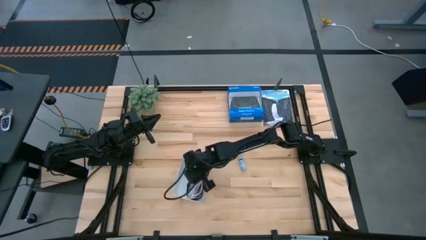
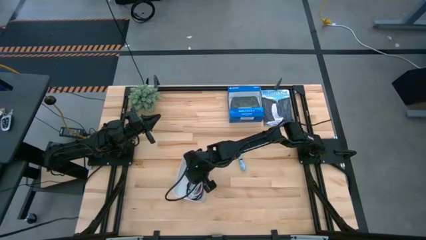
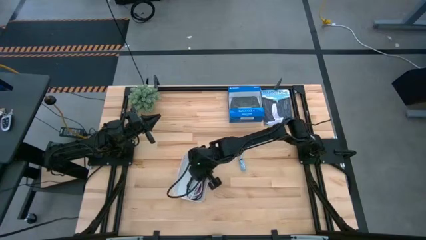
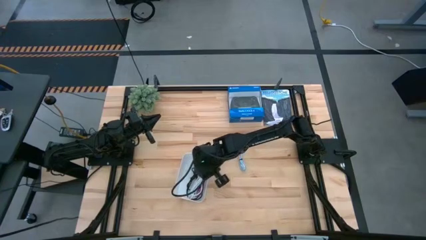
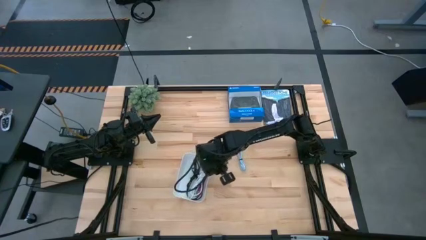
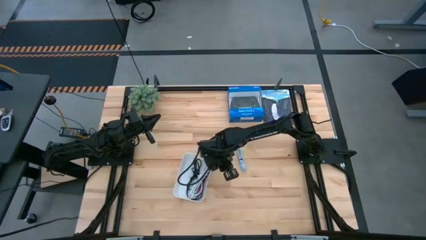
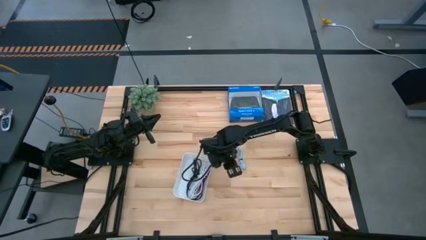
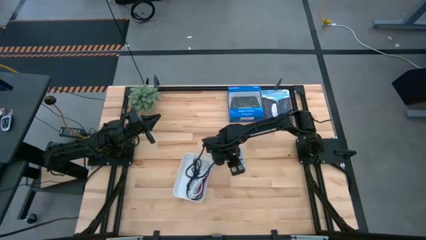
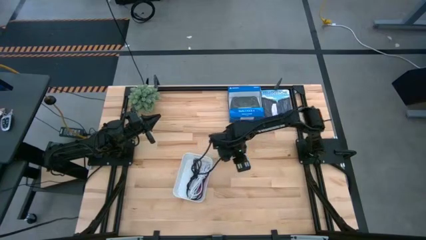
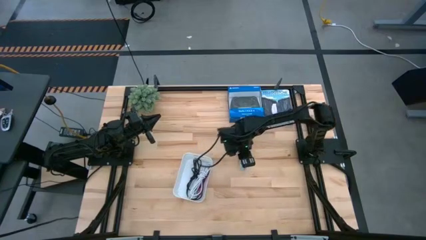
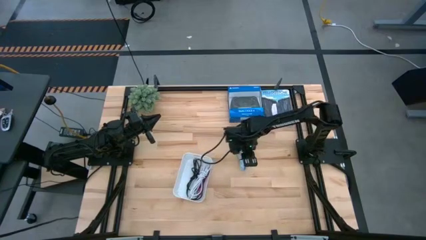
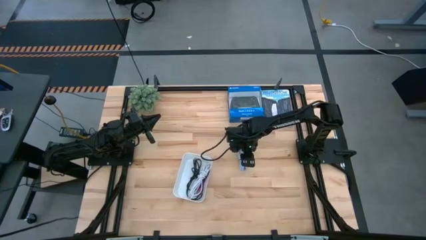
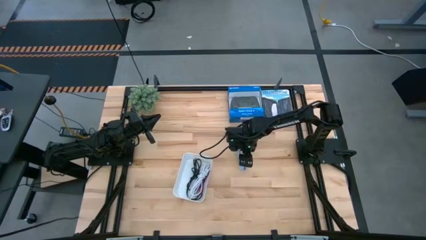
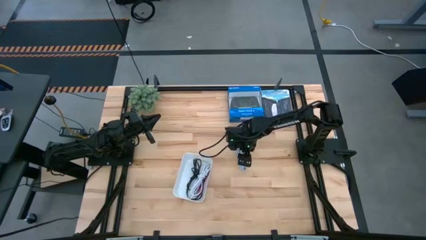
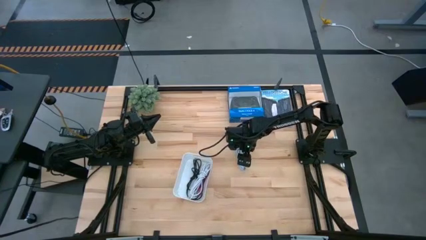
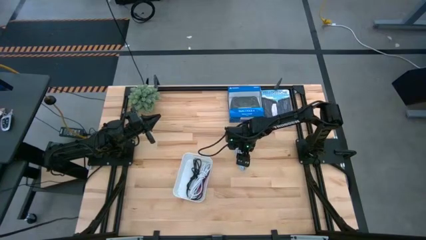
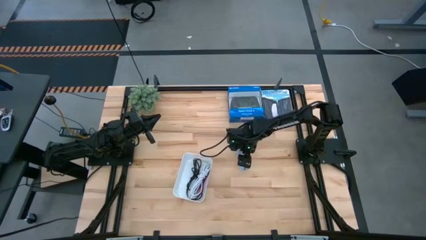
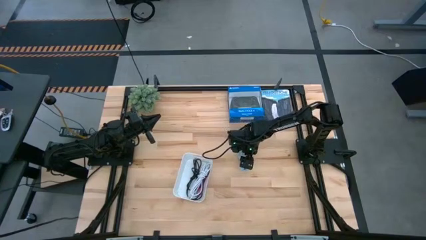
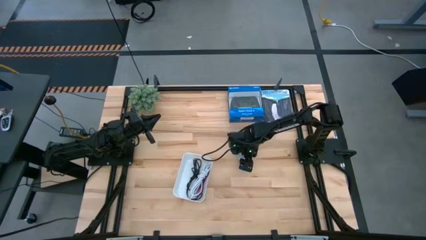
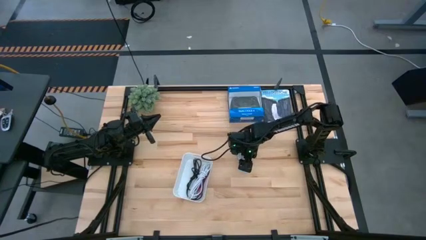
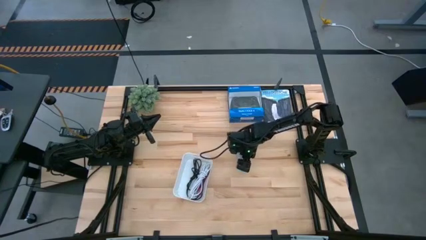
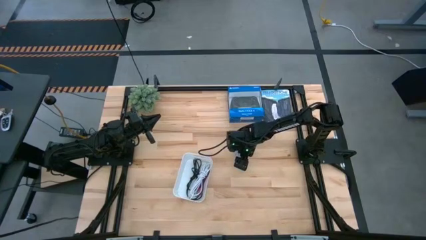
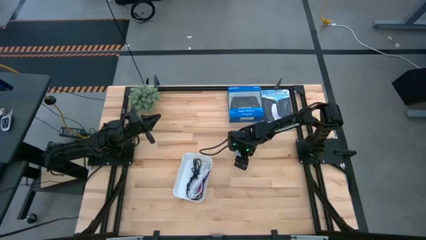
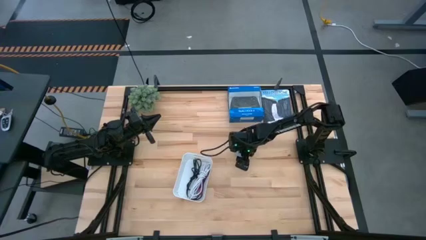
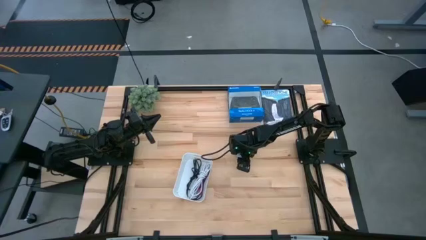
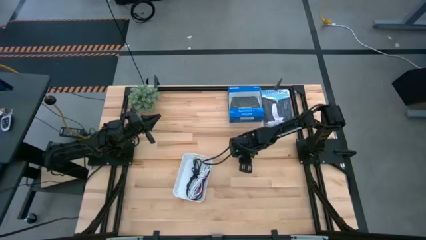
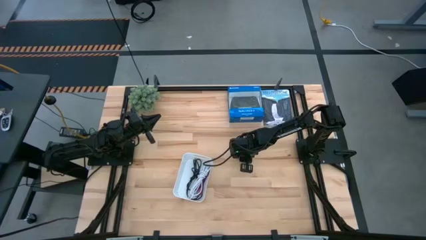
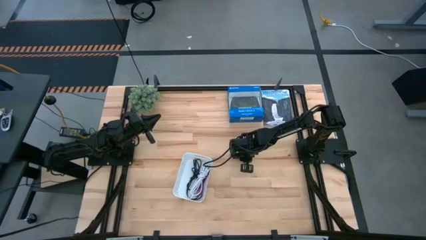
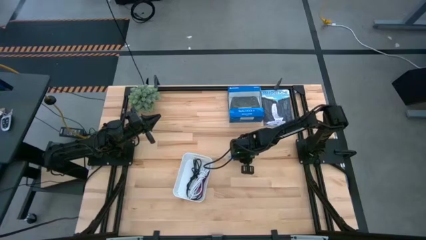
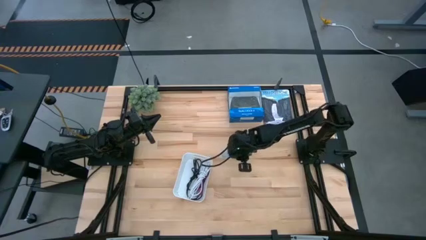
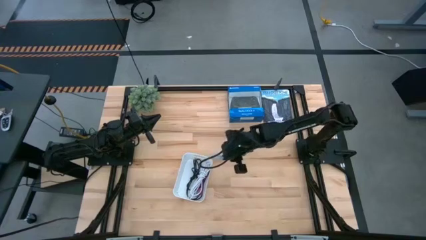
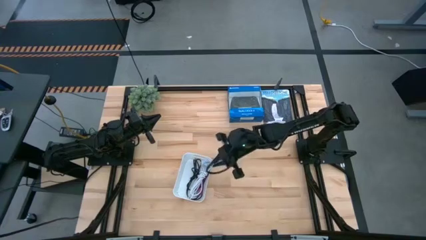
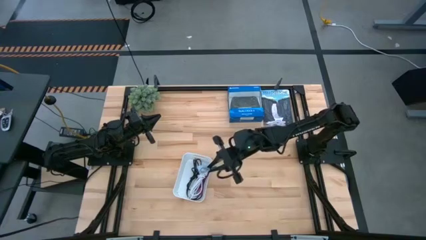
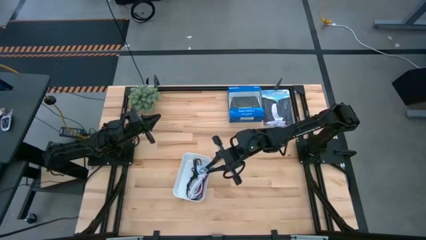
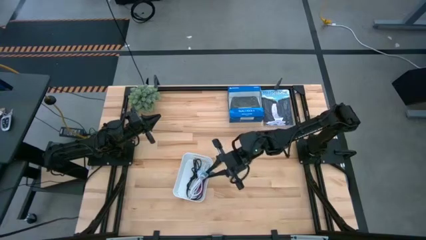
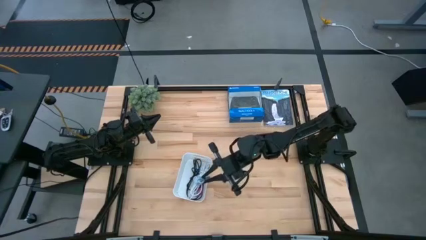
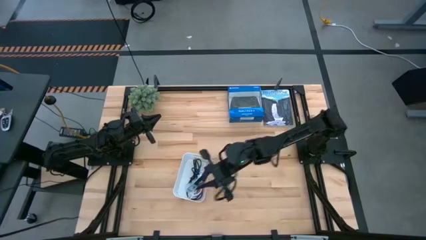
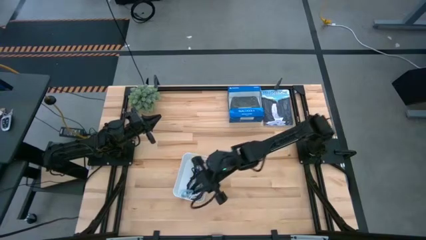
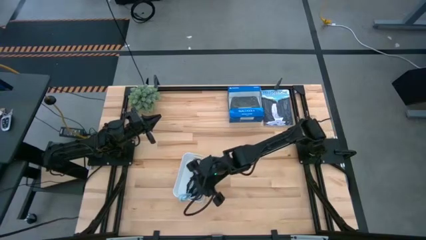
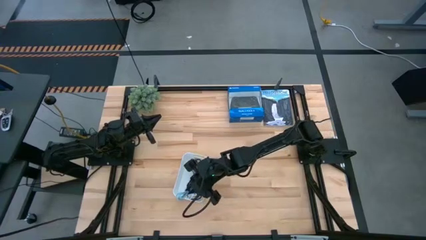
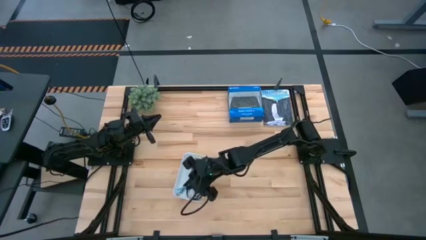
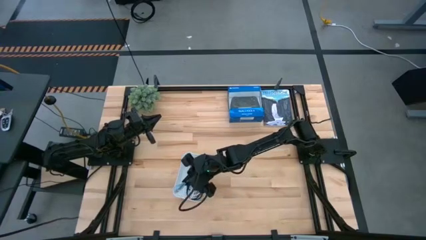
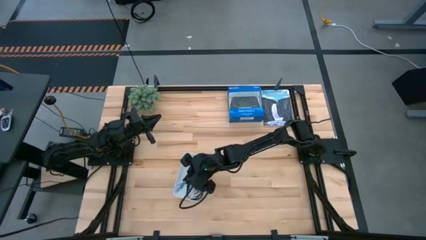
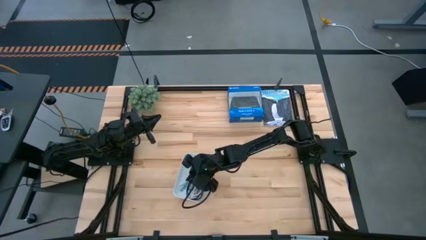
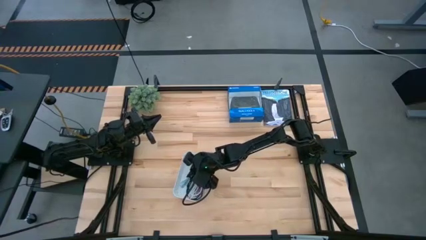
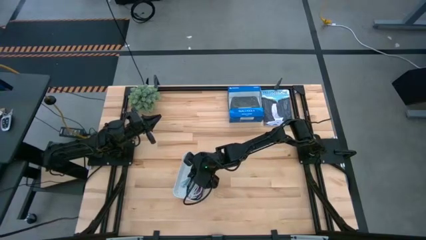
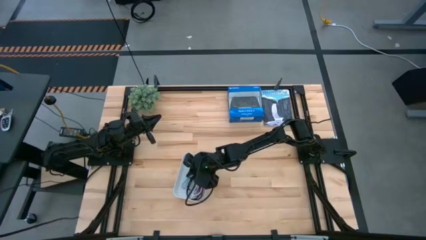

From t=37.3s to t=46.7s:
Task: Pick and place USB-C Cables
Put the blue charger cable into the white bin

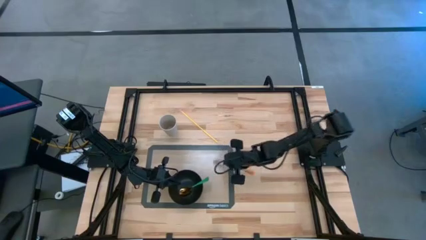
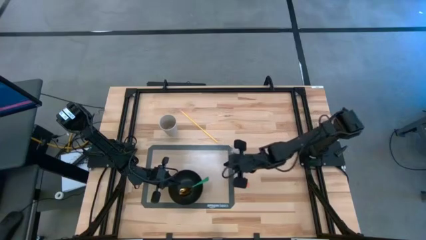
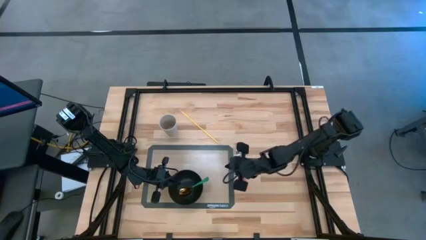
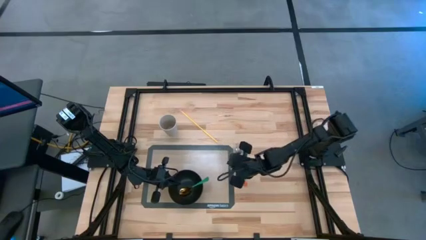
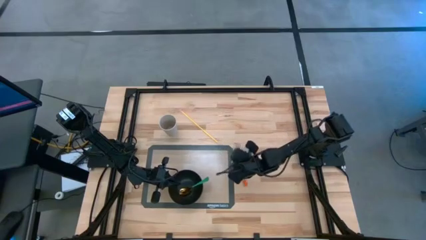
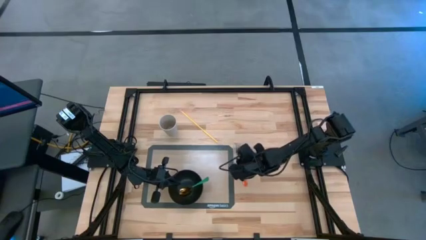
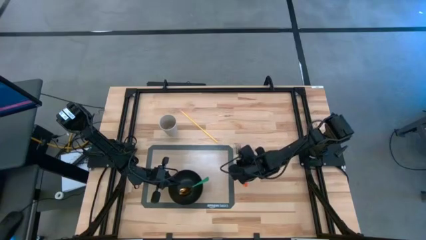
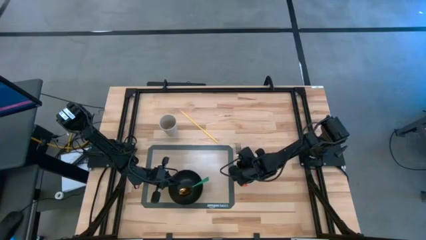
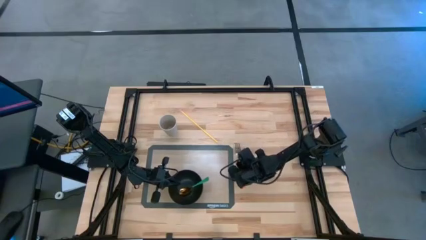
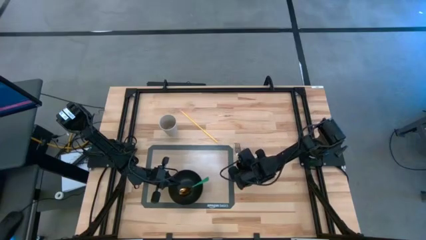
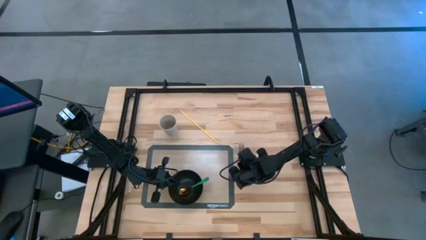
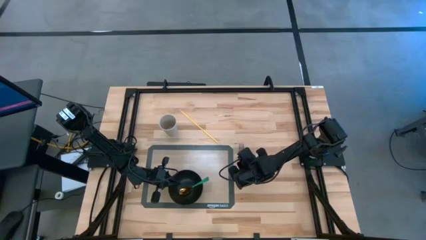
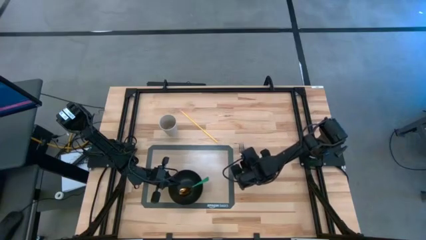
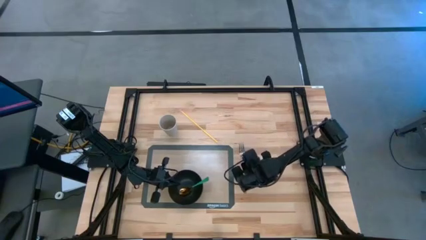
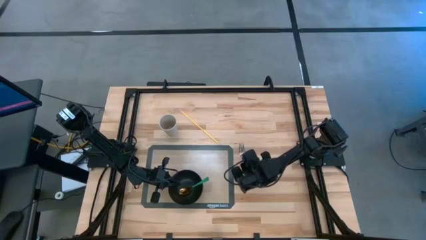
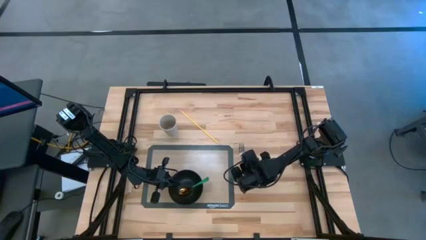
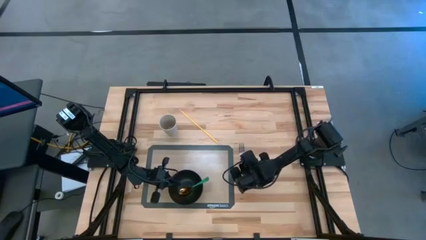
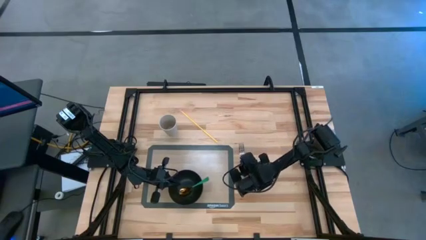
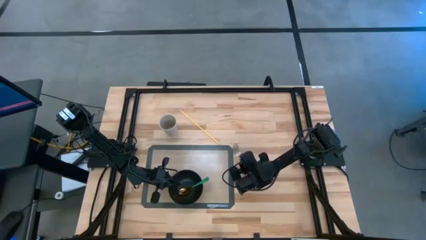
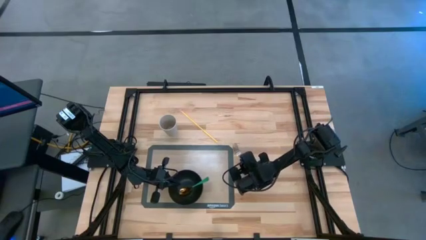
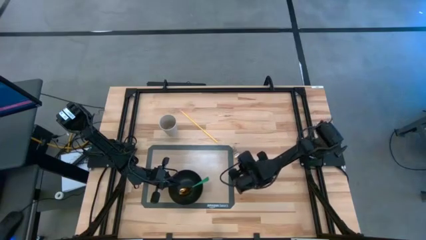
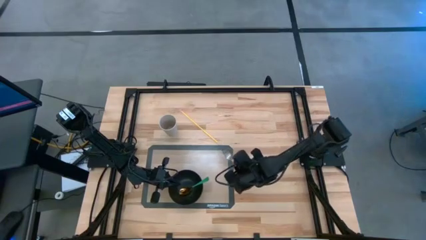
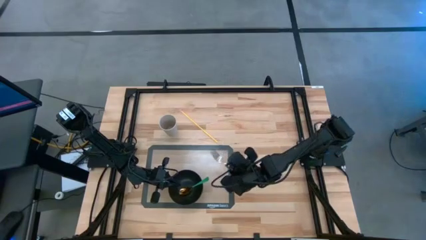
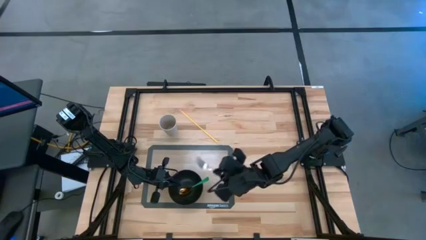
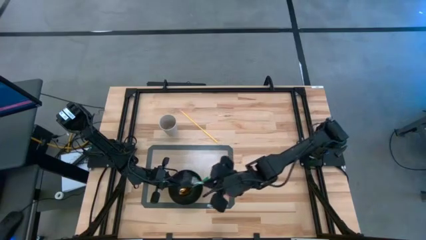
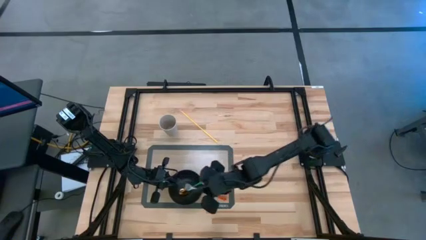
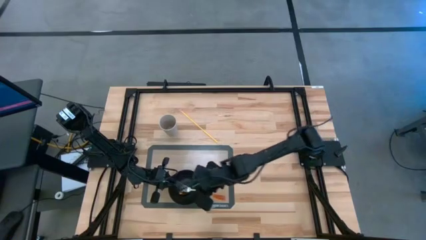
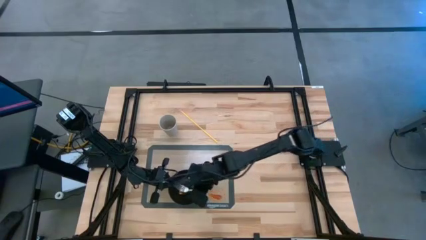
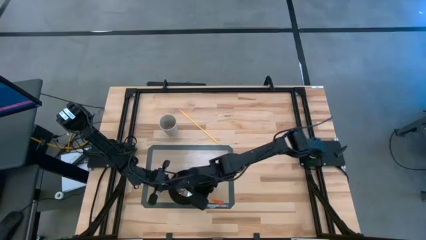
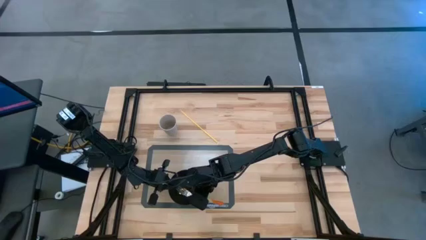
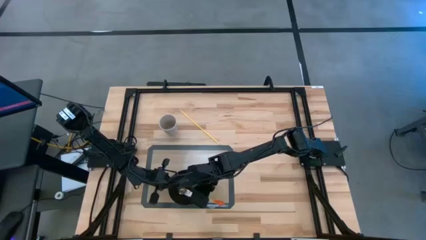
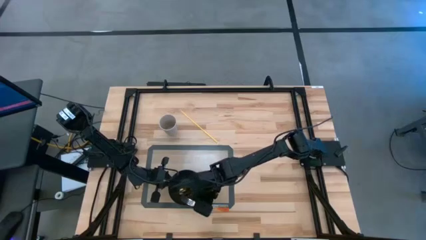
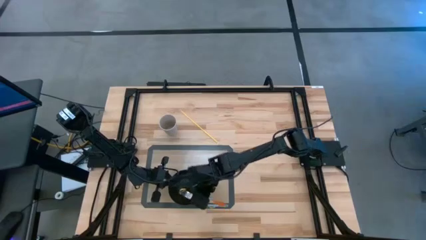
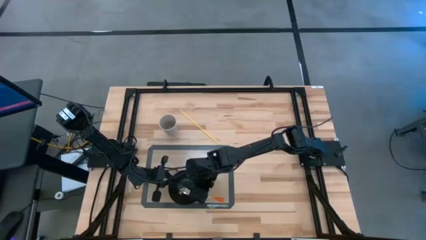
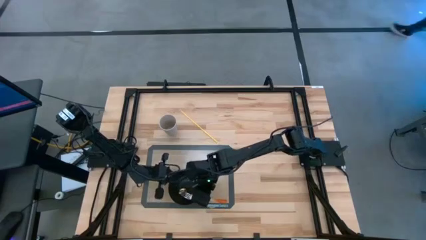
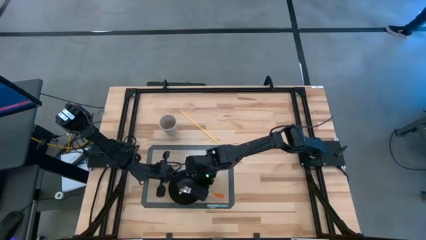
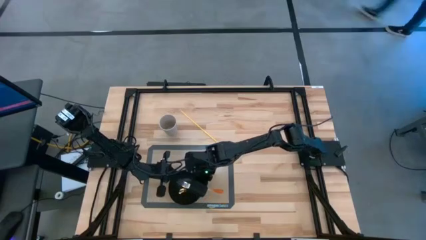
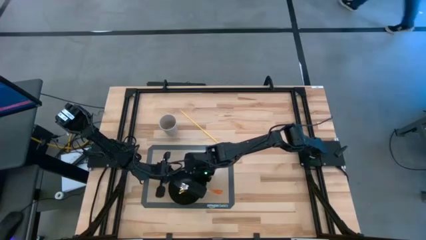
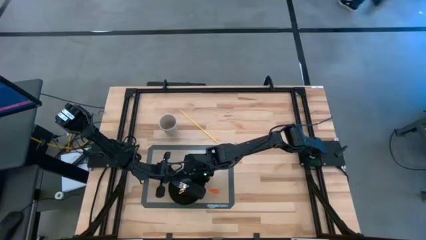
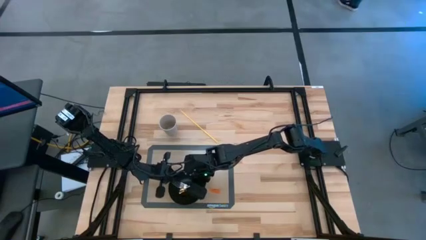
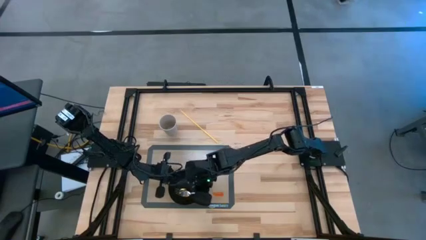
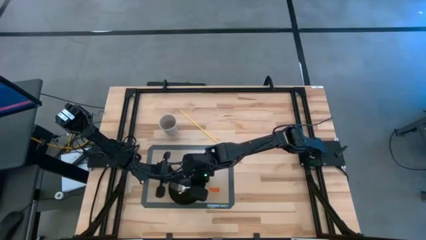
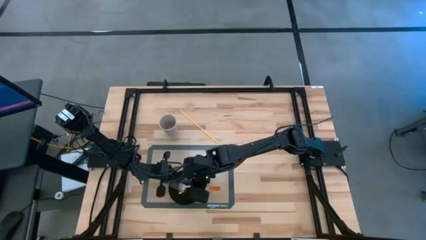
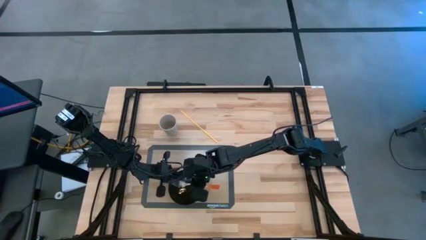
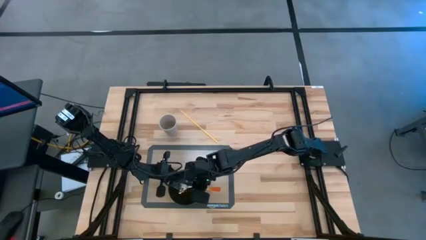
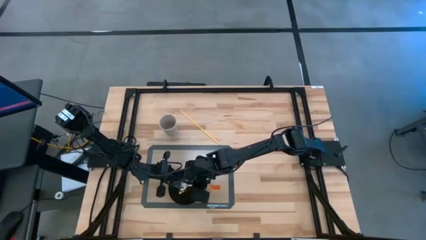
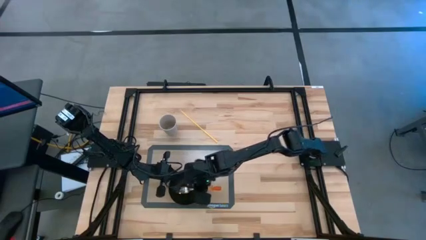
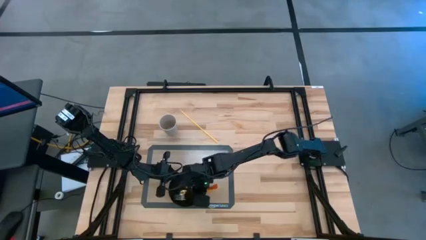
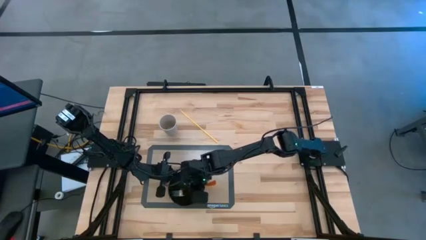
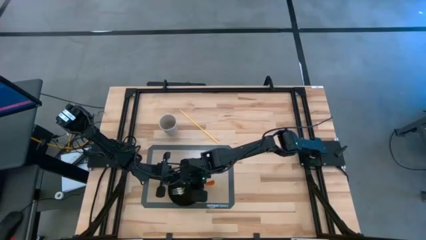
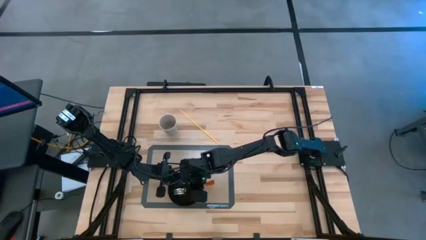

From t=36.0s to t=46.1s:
Task: Pick & Place Utensil
Put the orange fork into the black bowl on the mat
